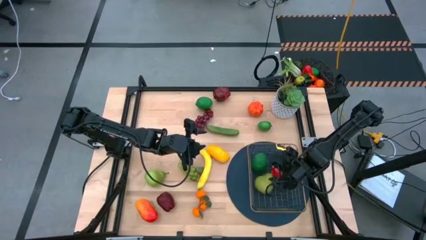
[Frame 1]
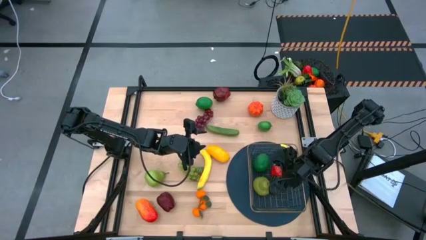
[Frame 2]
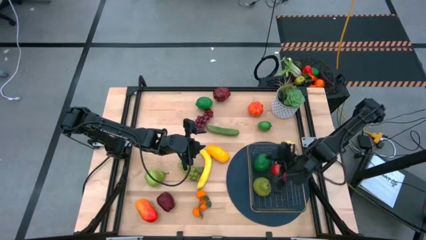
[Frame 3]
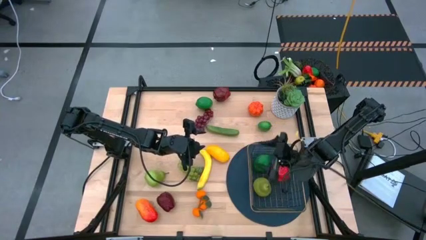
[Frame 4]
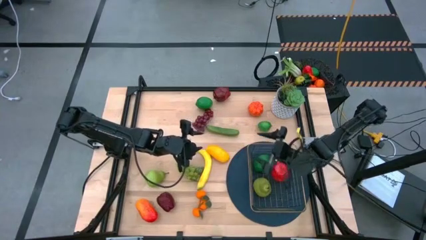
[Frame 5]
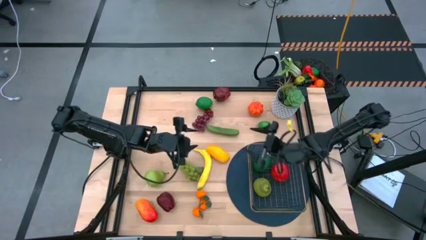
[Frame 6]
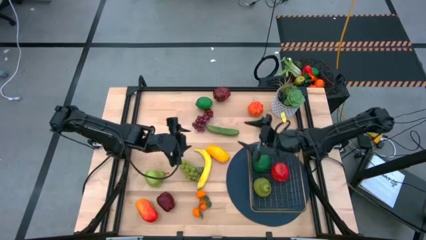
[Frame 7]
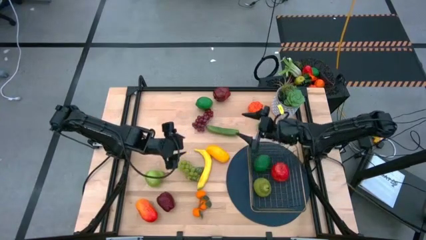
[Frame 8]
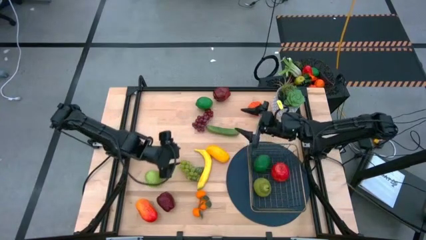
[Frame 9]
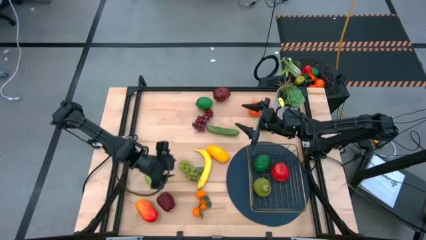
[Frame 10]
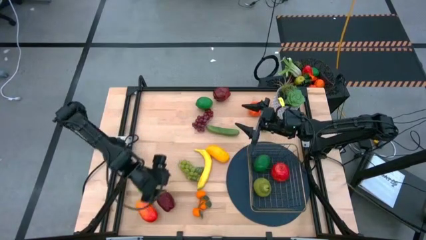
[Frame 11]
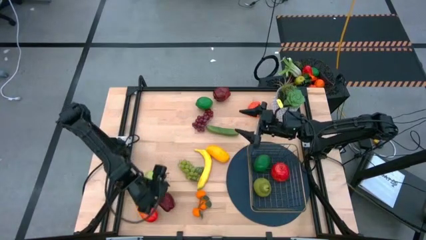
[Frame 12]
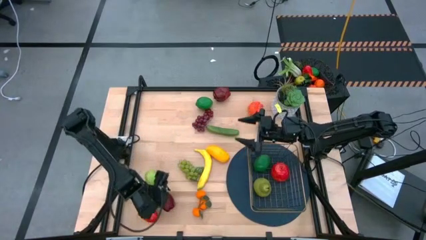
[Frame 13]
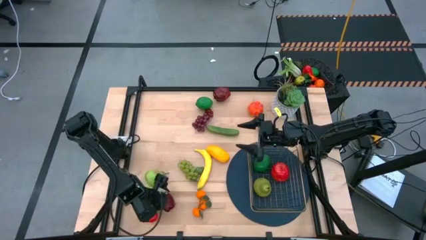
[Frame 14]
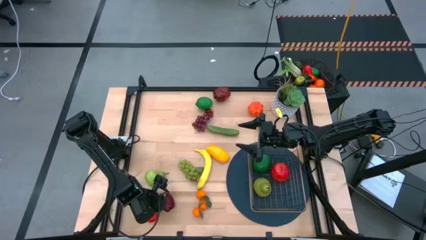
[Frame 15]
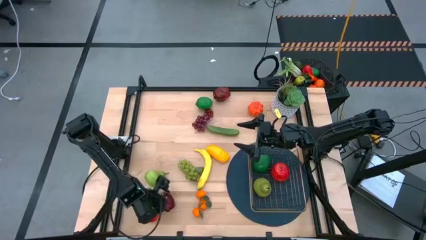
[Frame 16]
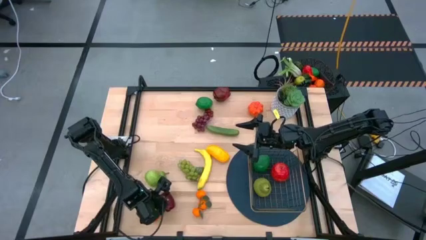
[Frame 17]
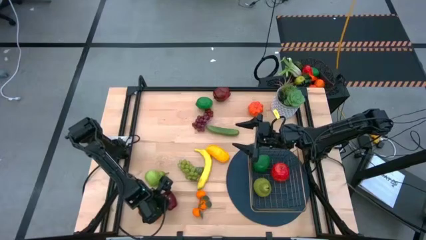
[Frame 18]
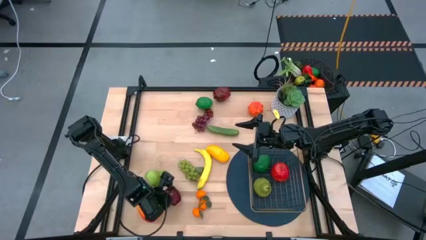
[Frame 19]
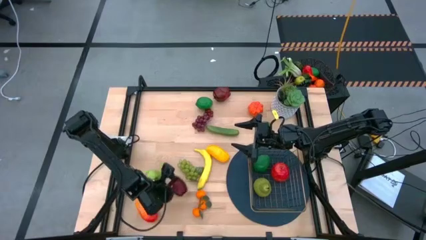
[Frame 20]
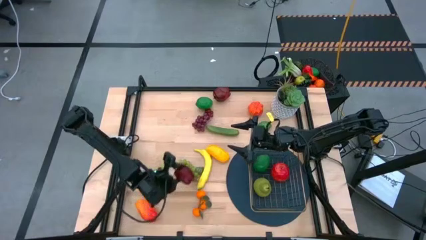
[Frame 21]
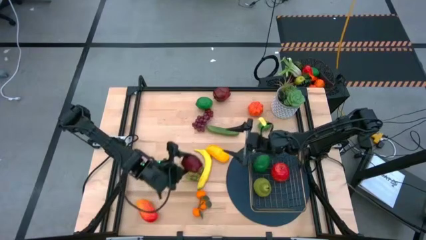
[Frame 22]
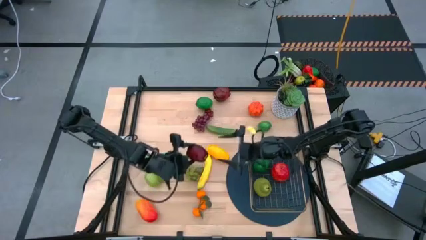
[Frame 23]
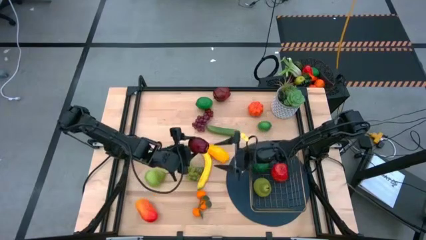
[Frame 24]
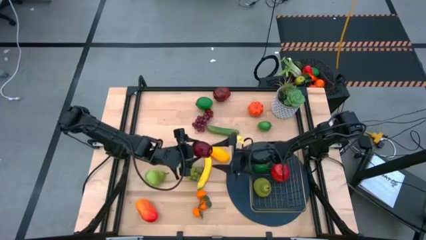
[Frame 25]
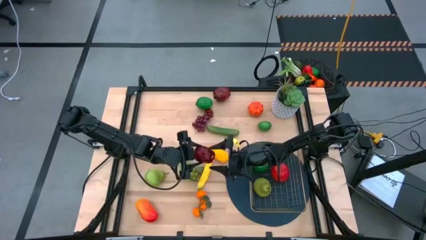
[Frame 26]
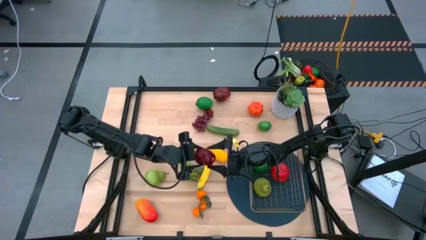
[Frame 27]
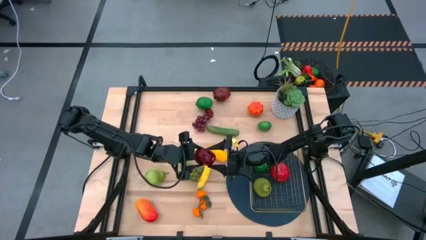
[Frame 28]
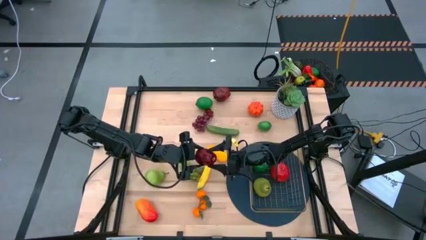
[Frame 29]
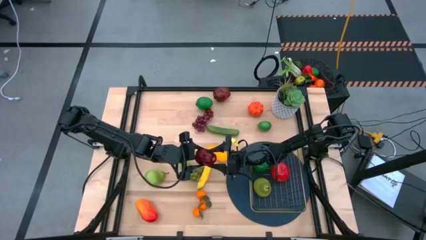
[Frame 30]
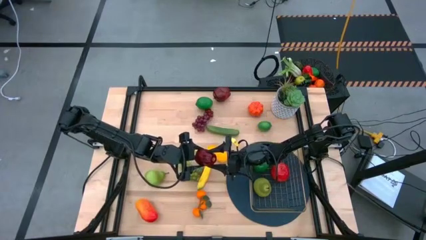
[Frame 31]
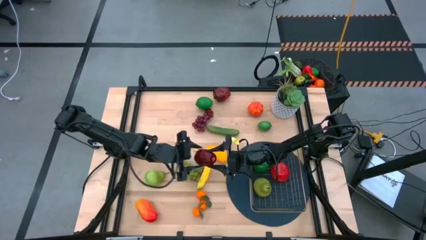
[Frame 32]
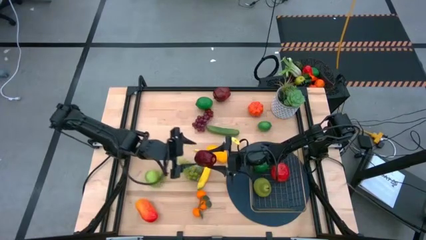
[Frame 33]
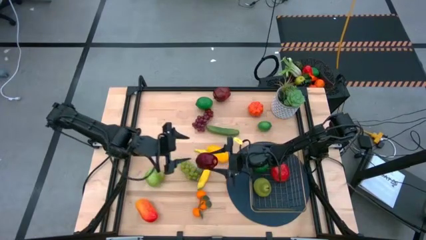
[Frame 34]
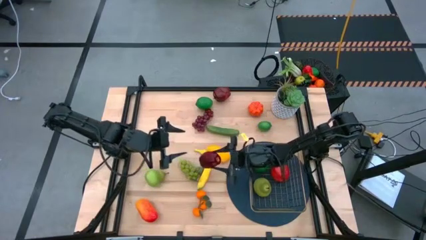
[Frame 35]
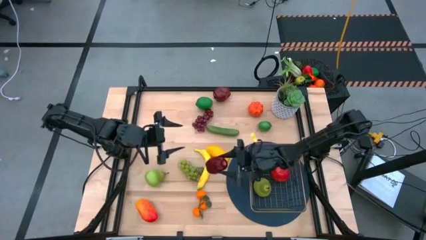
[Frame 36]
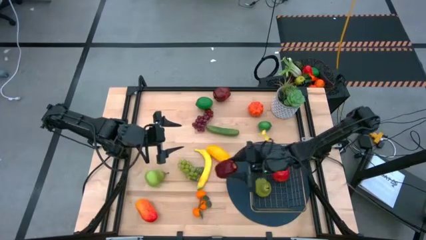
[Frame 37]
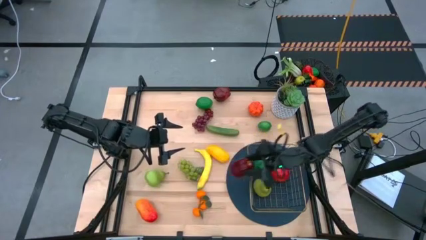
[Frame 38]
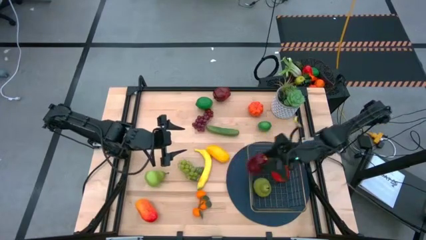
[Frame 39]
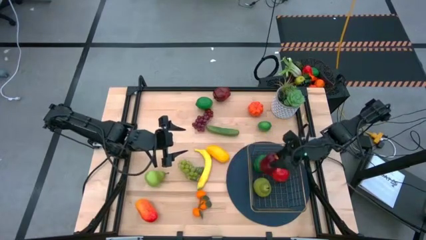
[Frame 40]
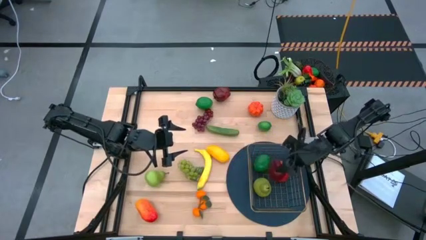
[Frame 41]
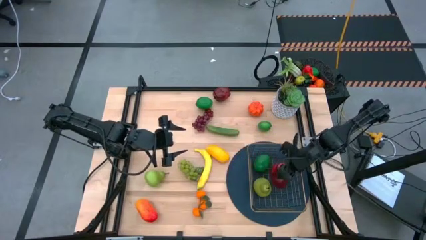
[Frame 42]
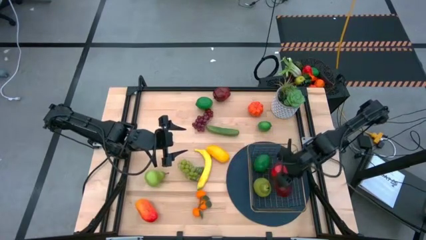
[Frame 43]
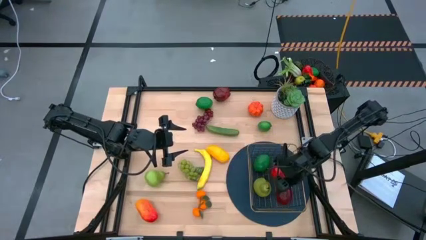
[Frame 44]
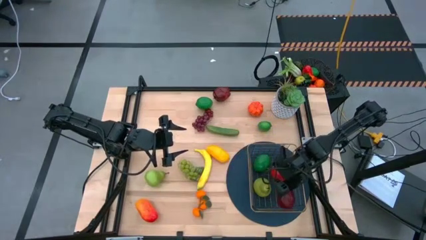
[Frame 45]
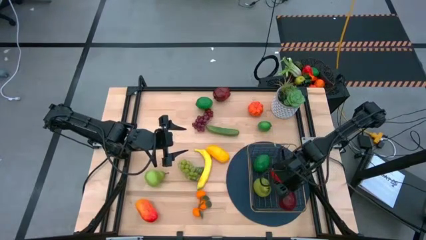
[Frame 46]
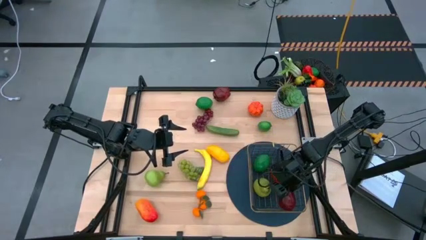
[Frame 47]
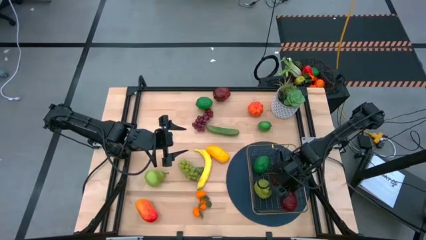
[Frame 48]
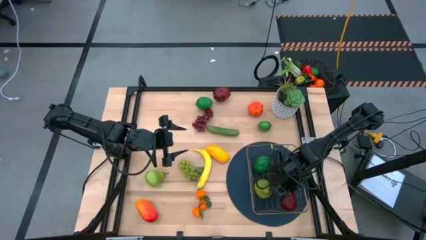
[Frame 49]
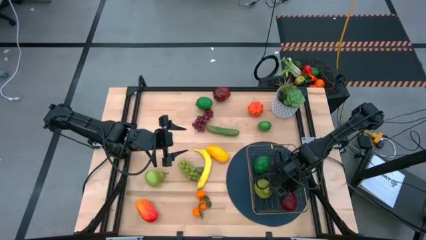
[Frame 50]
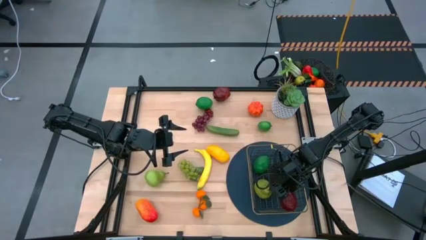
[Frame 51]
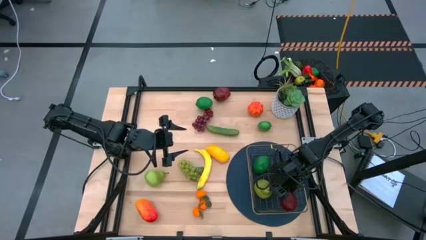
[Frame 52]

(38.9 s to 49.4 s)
Task: Build produce basket
Put the bottom dark red apple into the wire basket

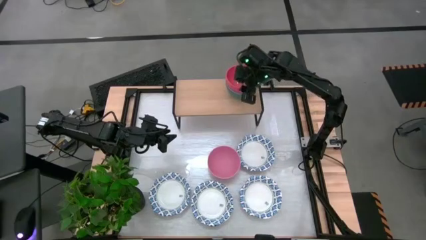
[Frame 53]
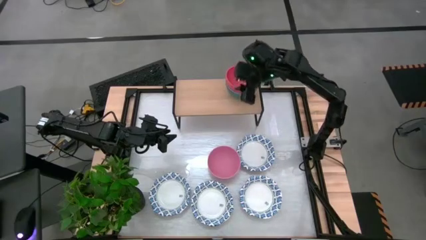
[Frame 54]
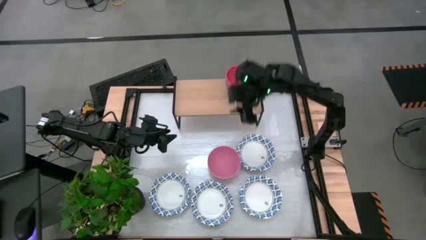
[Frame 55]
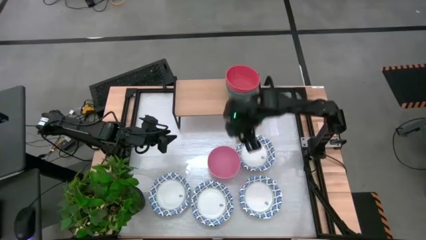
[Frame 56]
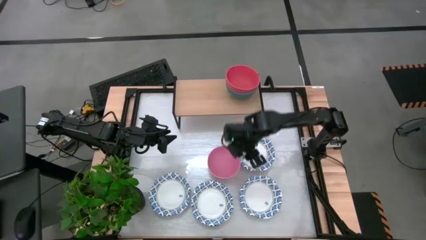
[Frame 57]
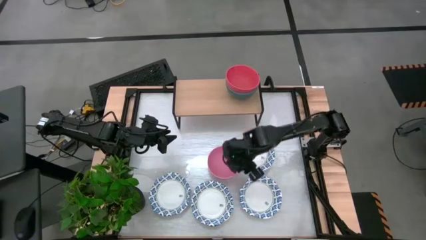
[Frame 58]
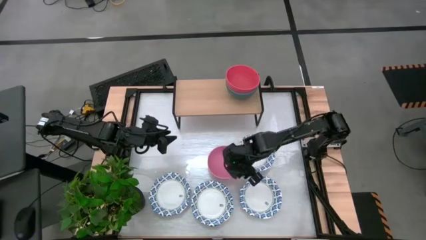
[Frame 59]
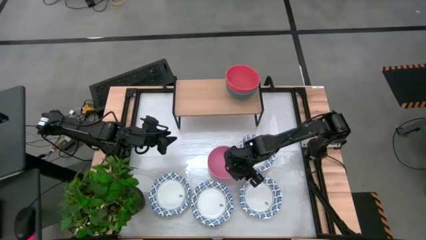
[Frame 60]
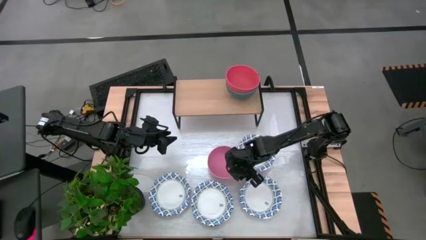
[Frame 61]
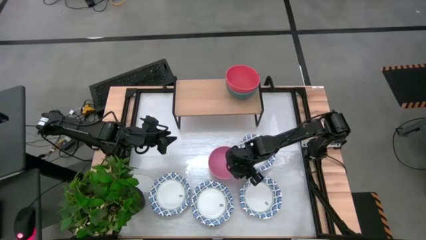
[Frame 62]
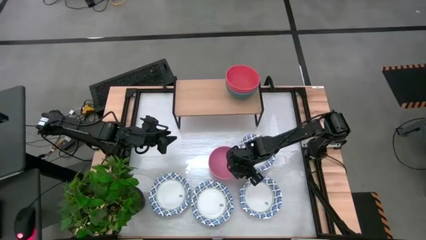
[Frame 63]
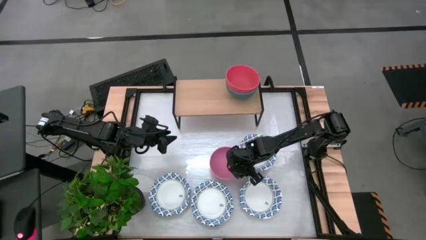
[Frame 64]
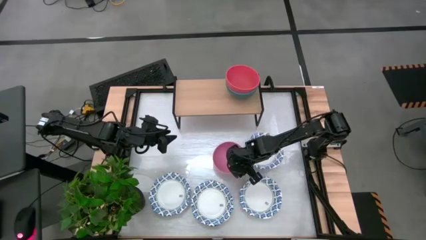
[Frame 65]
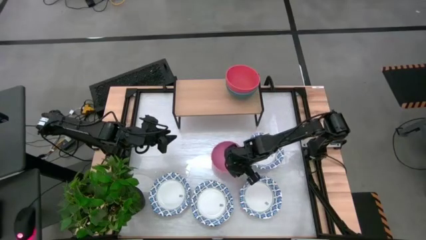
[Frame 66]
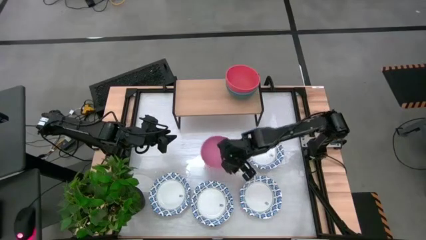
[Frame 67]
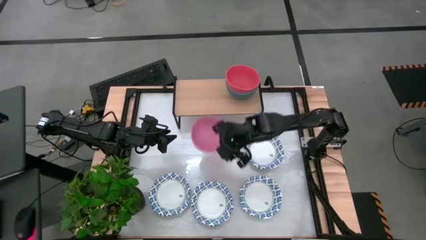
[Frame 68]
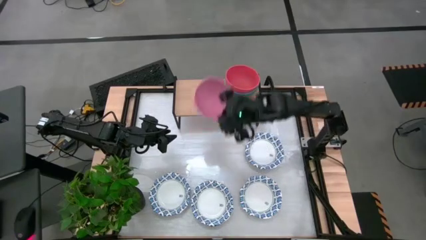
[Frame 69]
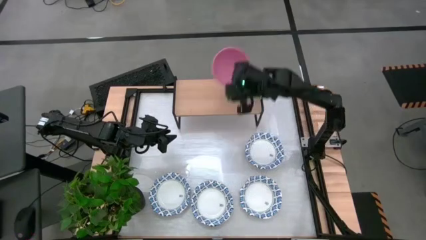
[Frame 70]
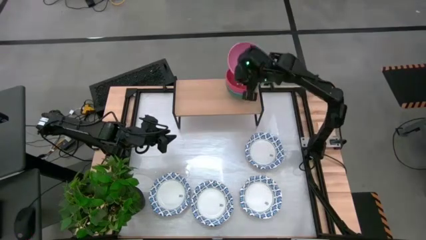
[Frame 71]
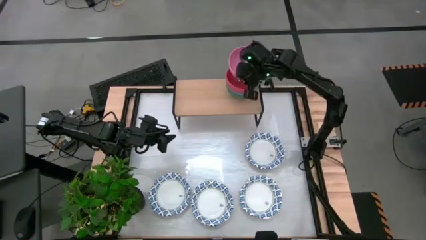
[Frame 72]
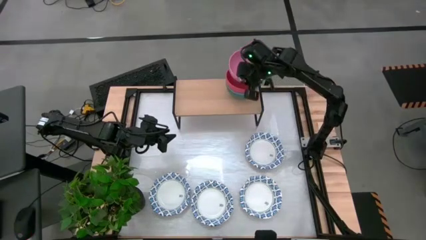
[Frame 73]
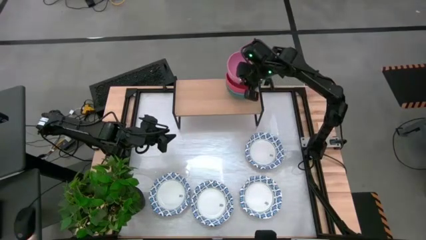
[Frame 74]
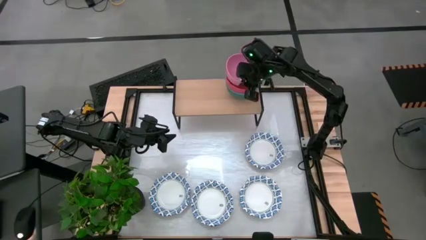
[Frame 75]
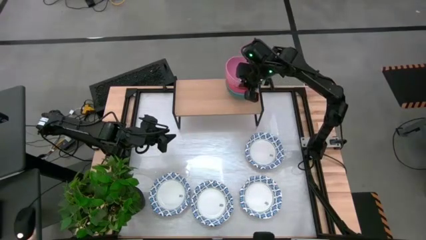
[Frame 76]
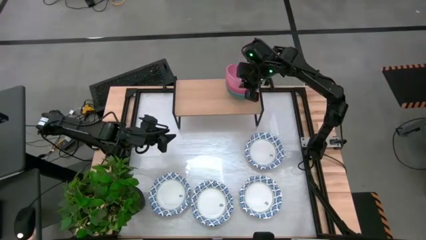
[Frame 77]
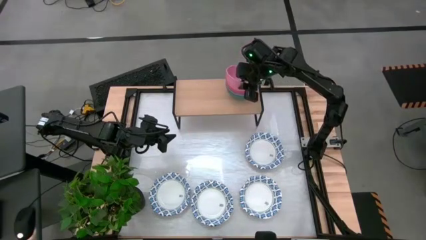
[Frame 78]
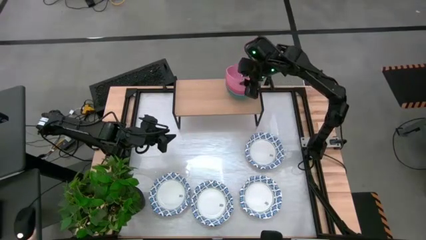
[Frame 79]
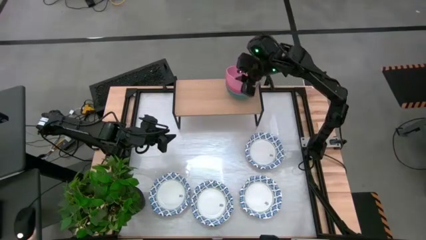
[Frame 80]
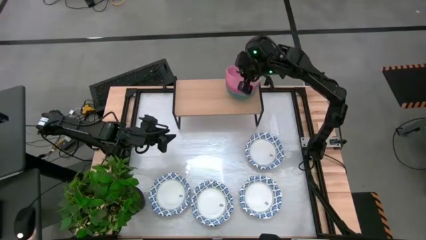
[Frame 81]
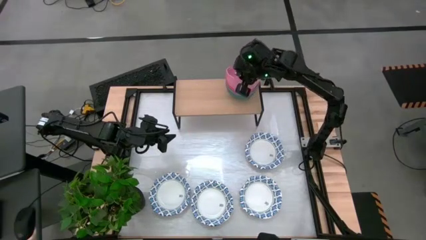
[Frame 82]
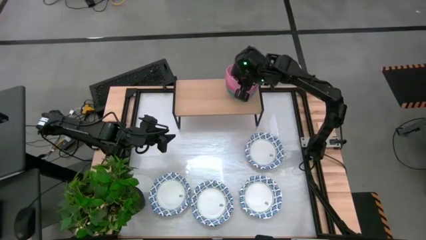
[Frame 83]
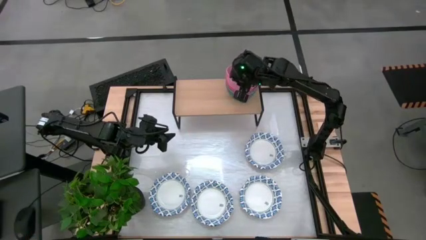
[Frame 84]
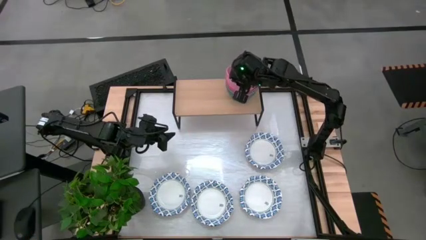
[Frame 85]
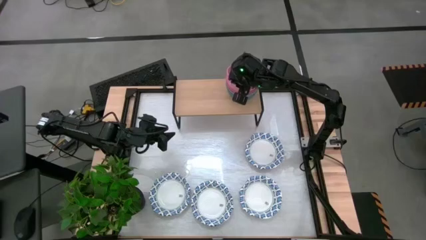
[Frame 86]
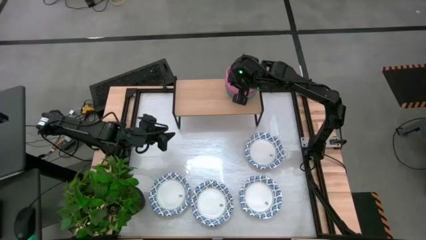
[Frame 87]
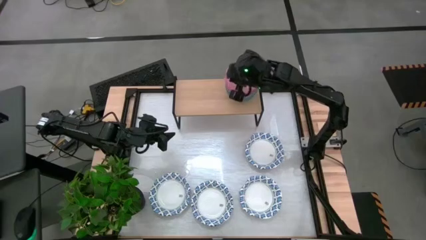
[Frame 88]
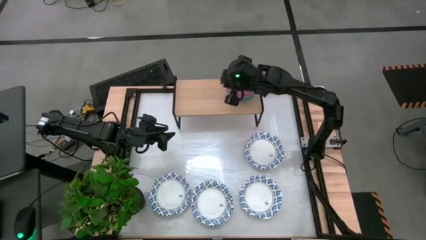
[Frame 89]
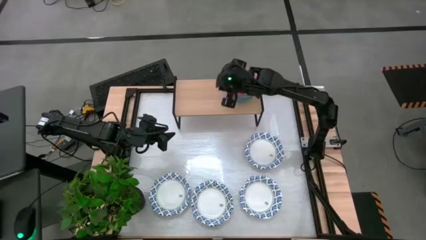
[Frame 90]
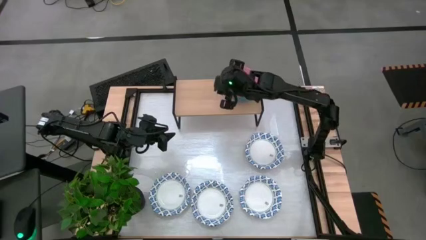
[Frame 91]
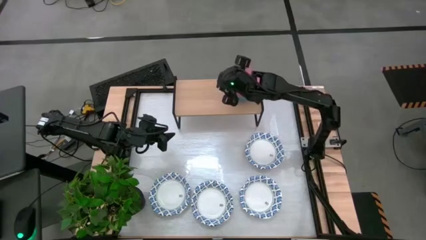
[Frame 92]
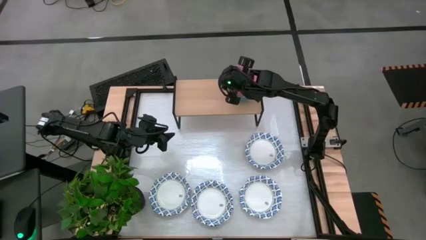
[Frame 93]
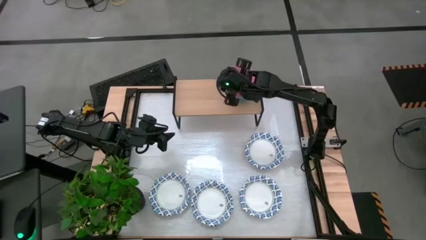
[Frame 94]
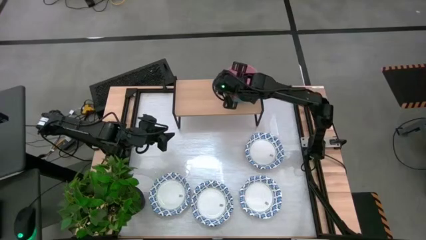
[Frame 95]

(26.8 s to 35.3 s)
Task: Place and stack bowls onto a shelf
Stack the pink bowl on top of the orange bowl on the shelf
